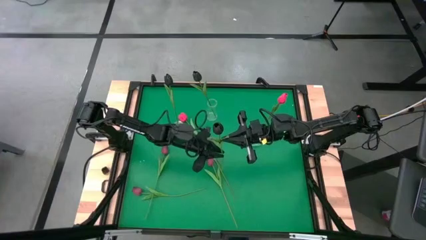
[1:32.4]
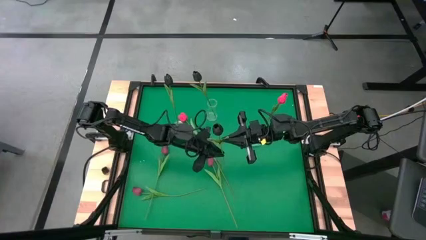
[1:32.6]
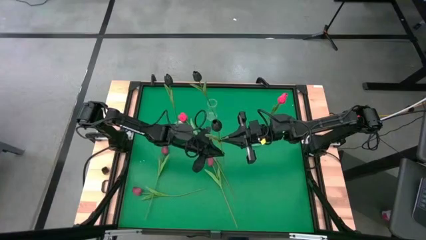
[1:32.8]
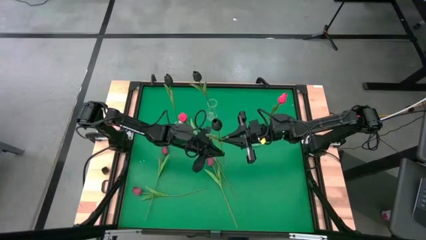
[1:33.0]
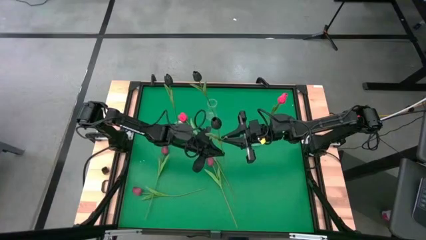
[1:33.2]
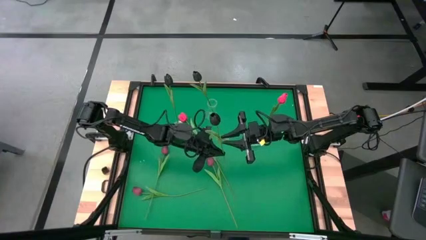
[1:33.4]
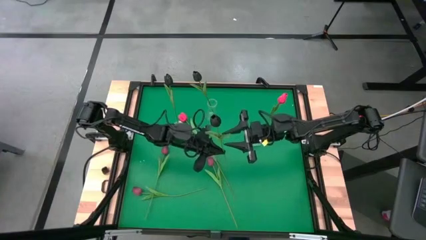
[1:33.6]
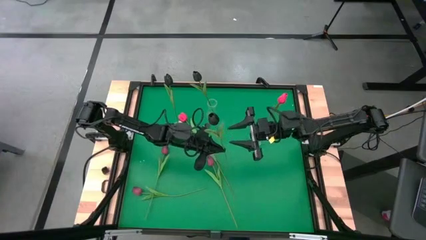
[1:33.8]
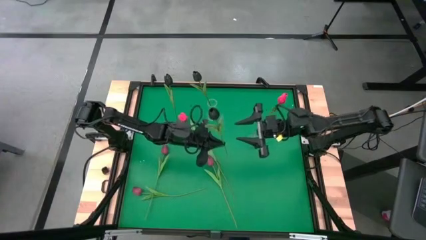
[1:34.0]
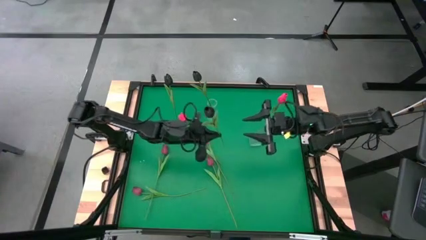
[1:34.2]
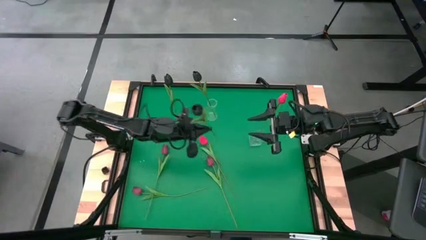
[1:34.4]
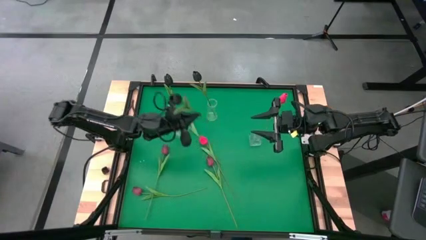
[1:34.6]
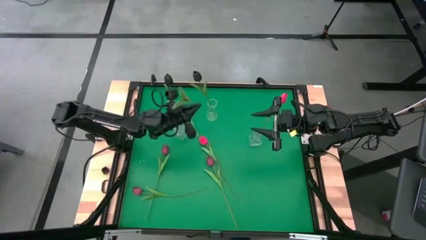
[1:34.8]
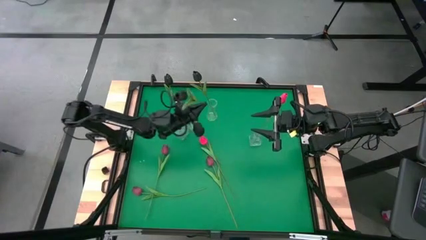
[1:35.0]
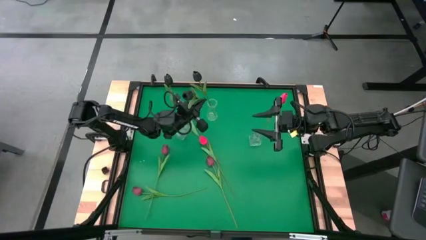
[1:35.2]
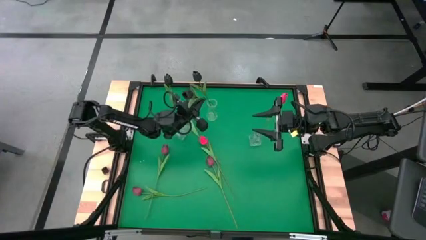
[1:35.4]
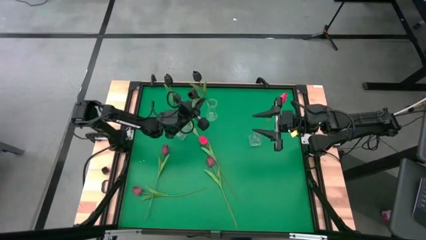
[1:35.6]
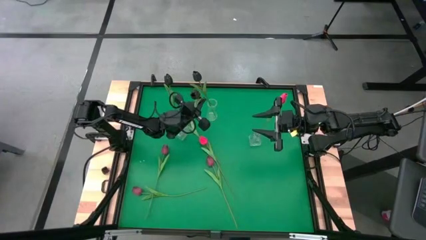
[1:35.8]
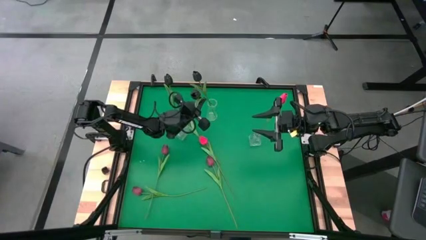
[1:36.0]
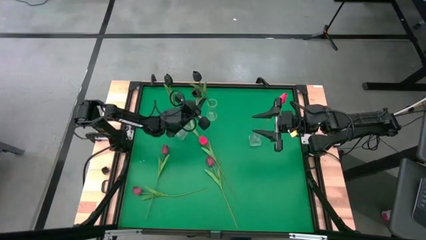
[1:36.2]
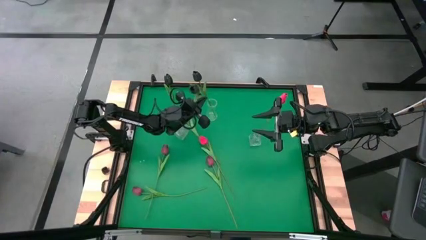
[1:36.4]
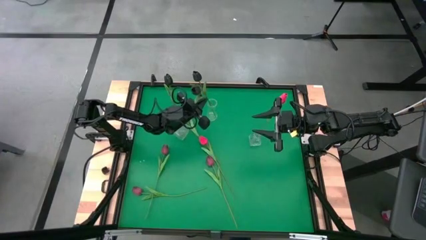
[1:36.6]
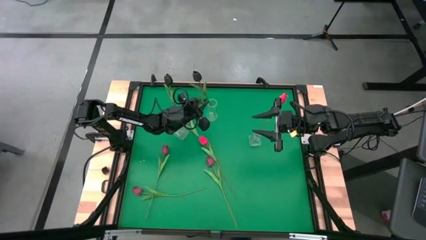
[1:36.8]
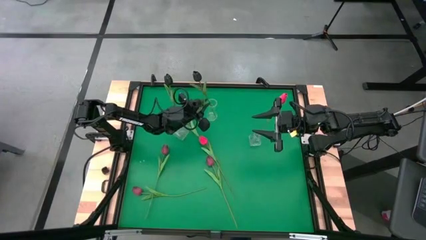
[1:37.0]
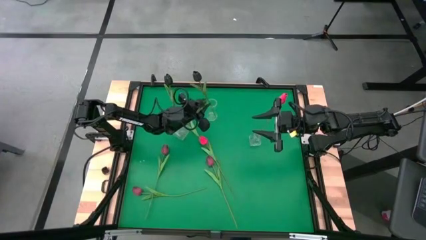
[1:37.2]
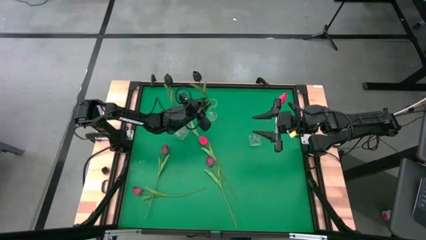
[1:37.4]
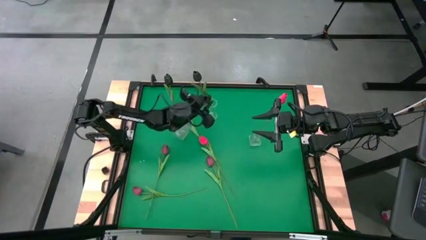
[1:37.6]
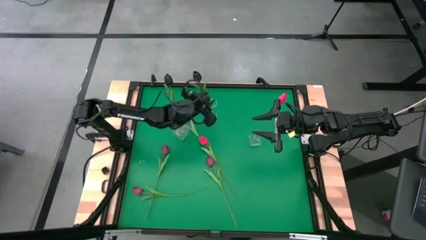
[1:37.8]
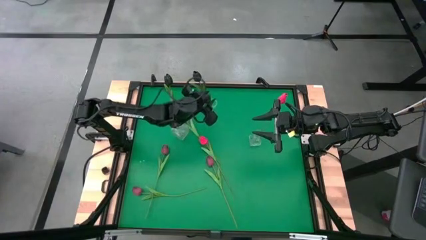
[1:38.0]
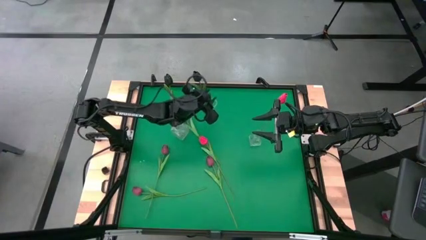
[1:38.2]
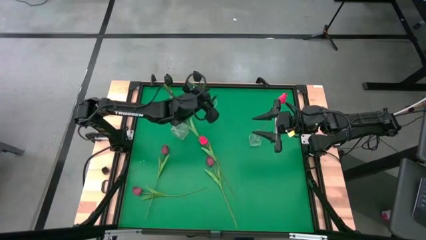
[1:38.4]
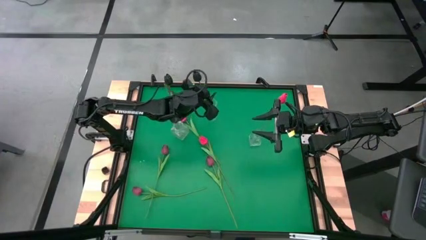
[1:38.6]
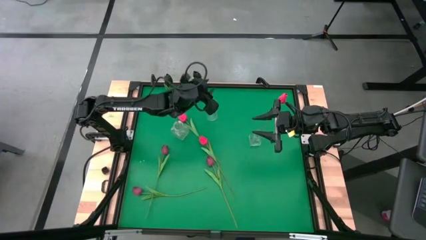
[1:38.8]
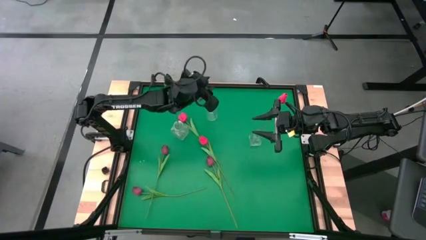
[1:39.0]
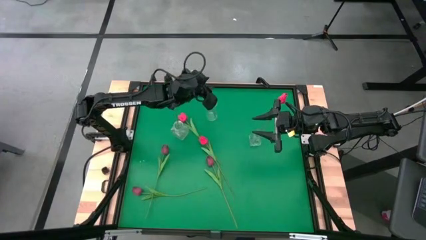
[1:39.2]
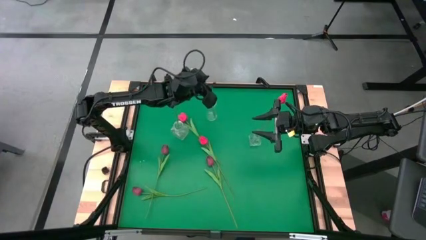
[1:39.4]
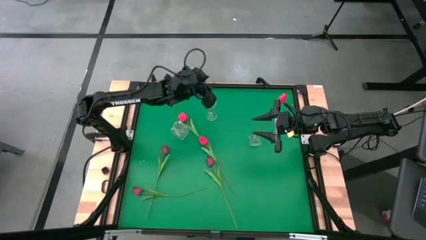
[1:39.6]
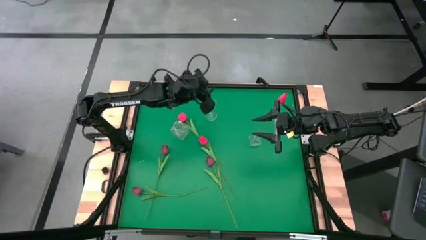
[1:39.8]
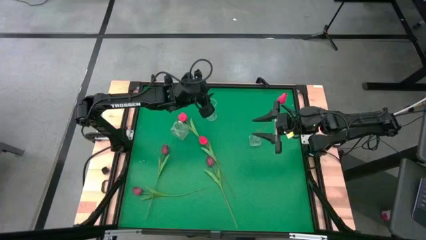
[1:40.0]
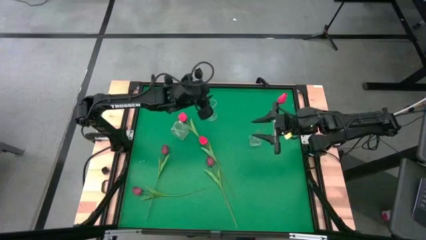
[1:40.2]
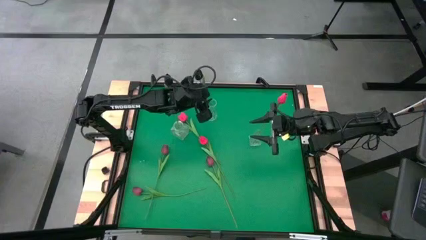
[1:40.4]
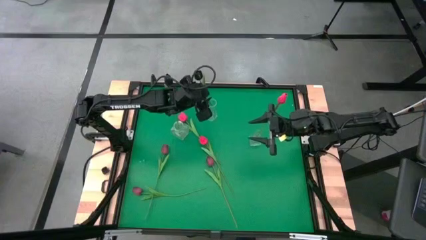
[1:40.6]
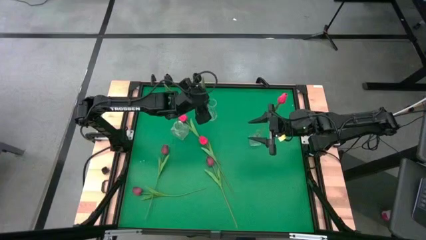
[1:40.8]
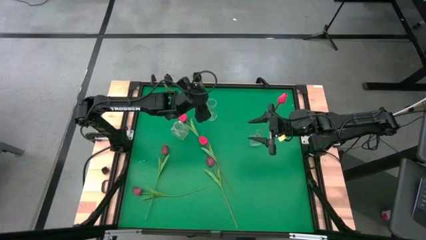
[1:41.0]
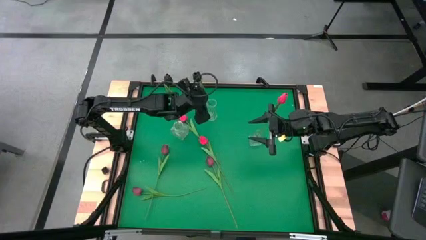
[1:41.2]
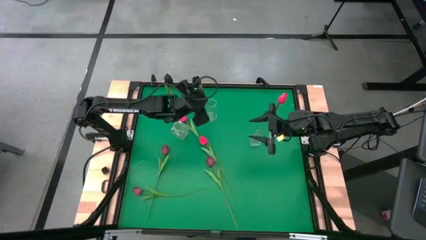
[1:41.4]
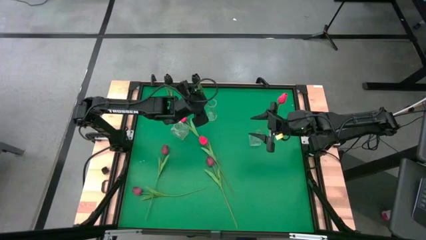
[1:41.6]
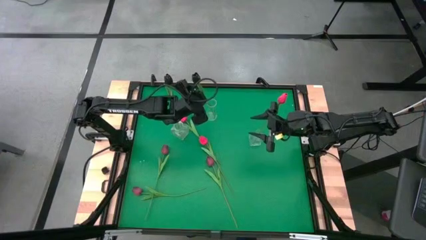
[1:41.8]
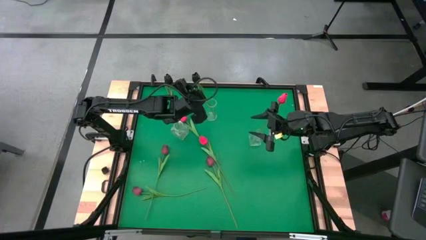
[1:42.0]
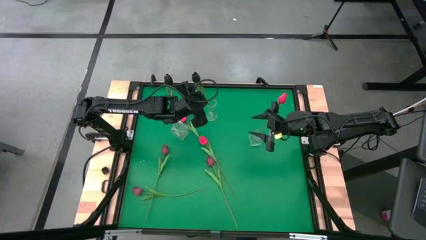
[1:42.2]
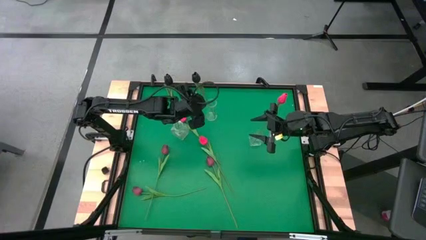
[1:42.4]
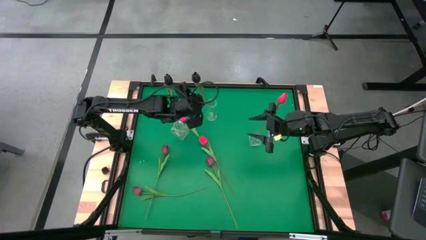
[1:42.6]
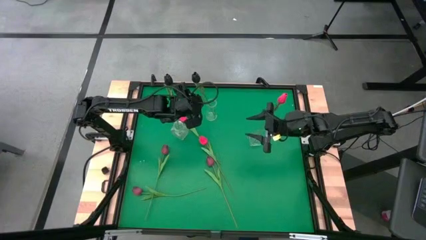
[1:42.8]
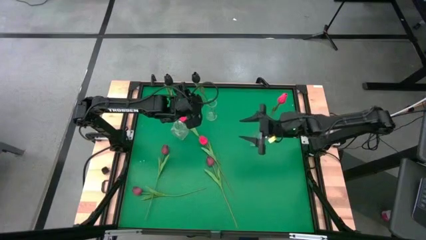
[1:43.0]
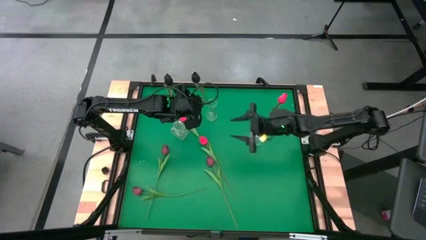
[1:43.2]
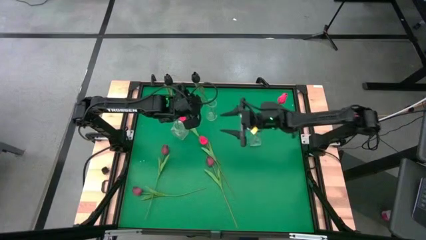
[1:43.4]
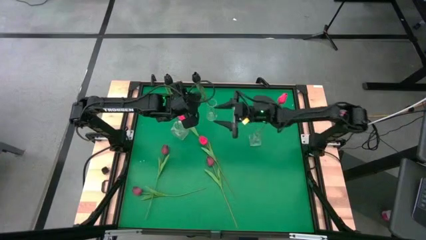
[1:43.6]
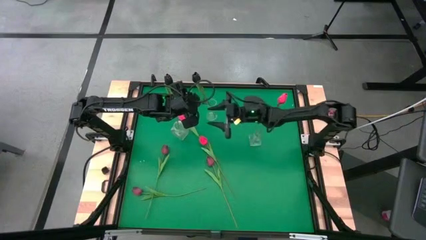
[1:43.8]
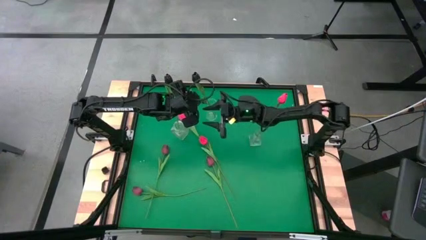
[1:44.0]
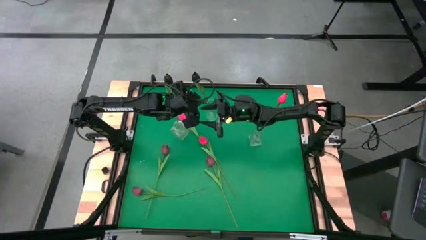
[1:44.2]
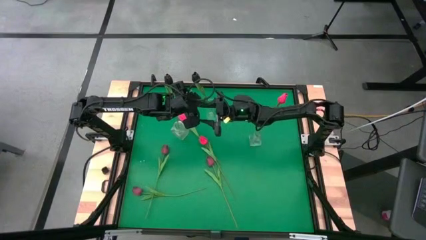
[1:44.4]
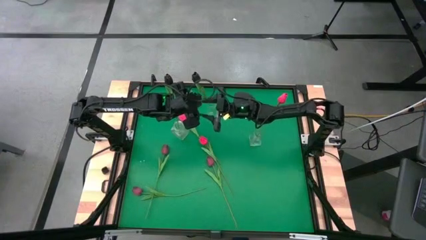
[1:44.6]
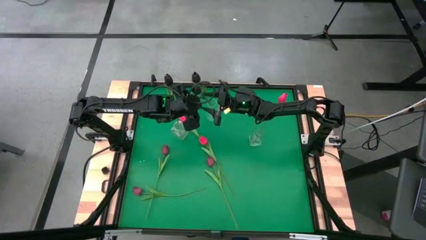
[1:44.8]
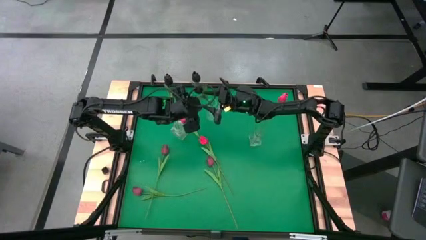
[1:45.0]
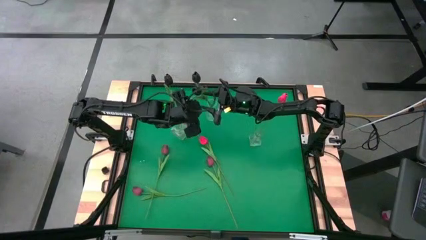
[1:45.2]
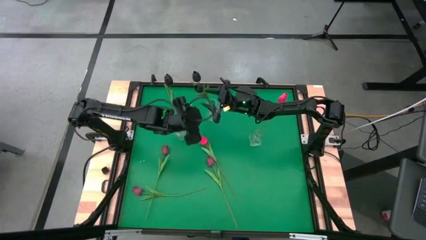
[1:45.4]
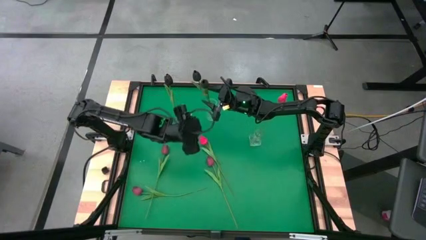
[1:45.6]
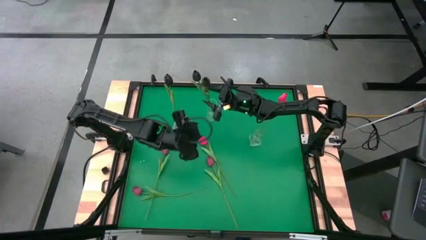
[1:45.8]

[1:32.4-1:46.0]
Task: Sort flowers into vase by color
Put the black tulip into the top transparent vase
